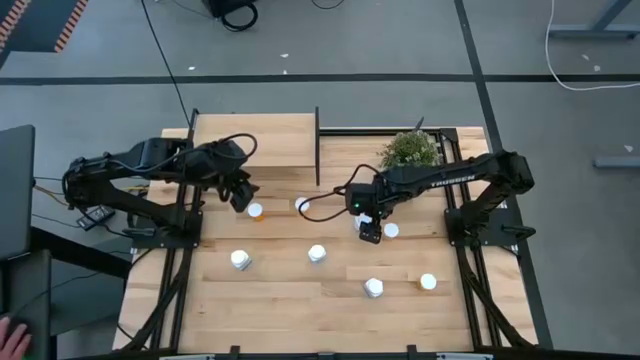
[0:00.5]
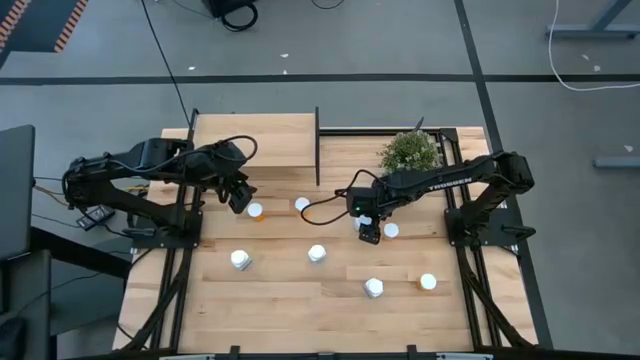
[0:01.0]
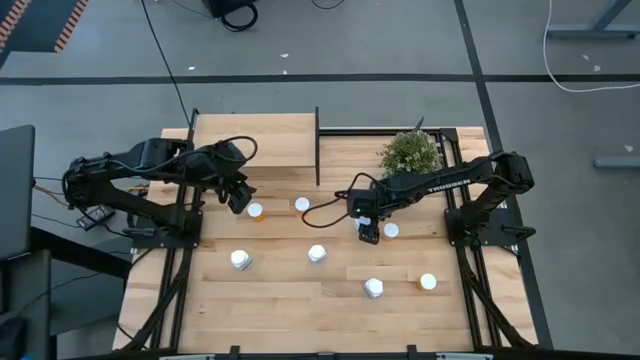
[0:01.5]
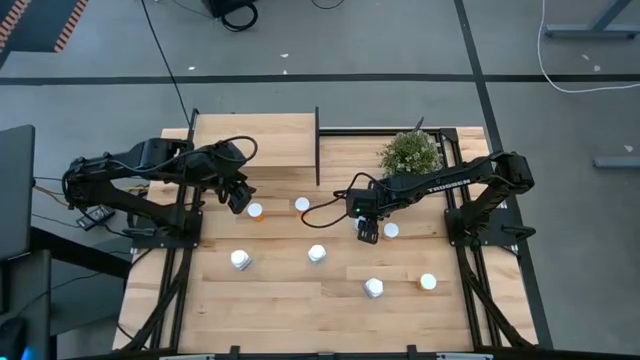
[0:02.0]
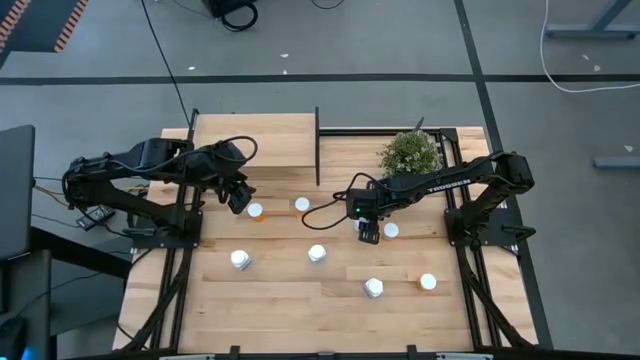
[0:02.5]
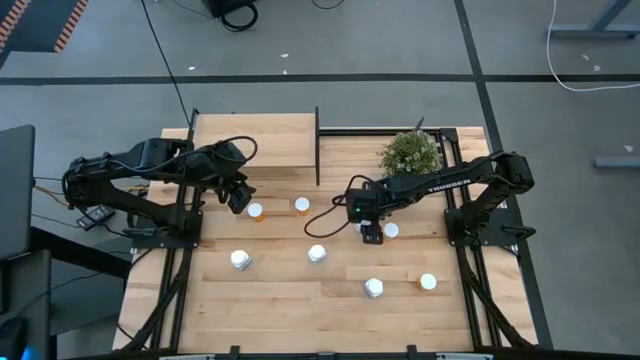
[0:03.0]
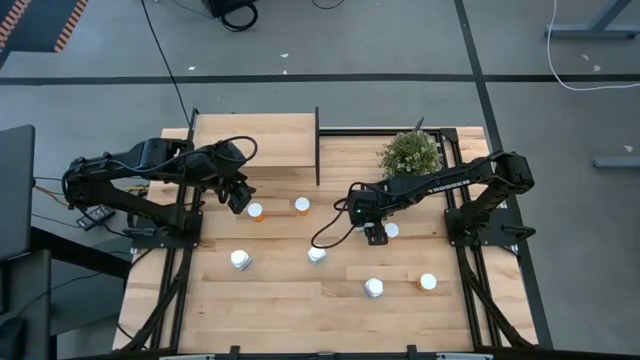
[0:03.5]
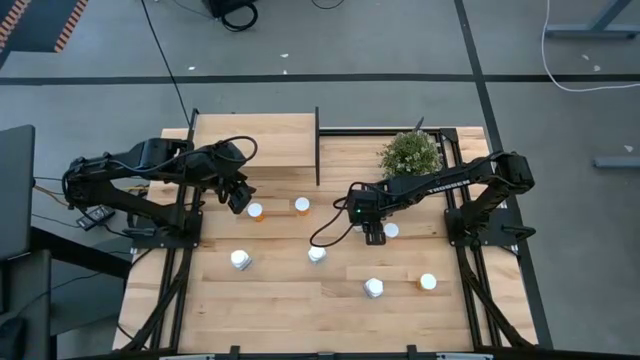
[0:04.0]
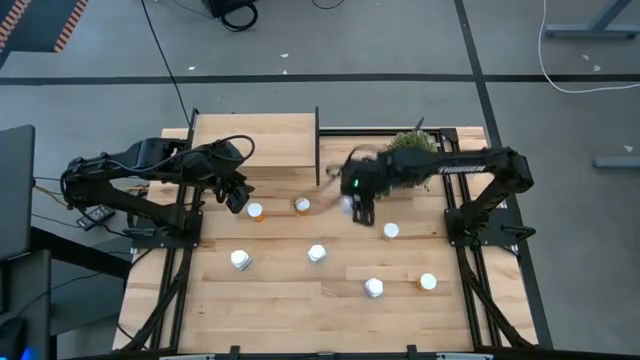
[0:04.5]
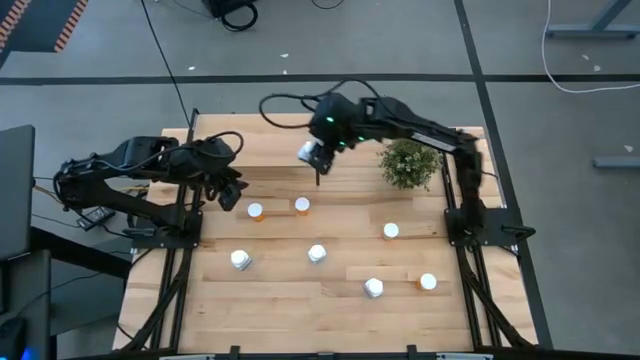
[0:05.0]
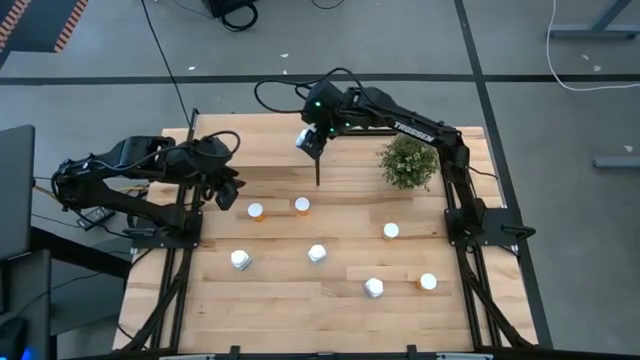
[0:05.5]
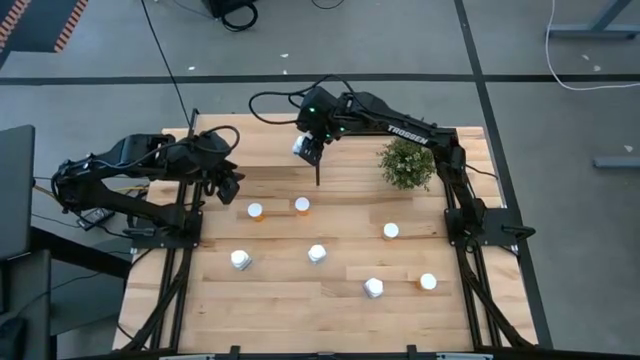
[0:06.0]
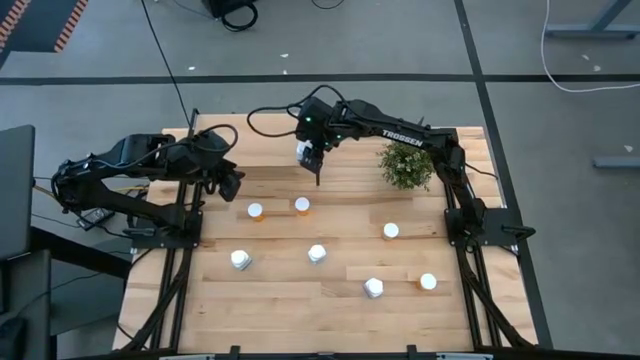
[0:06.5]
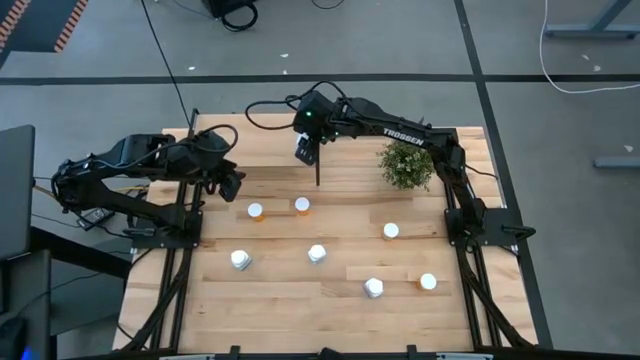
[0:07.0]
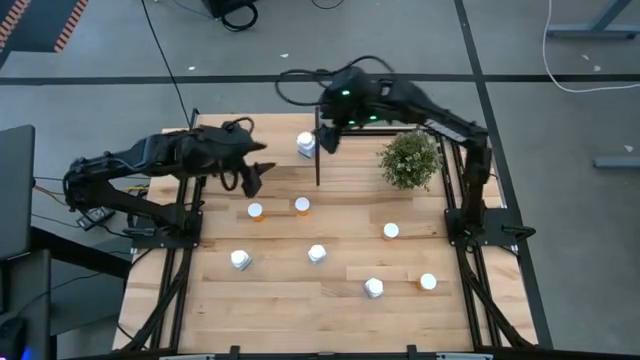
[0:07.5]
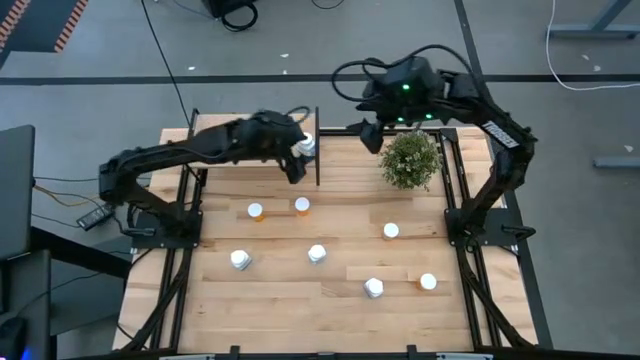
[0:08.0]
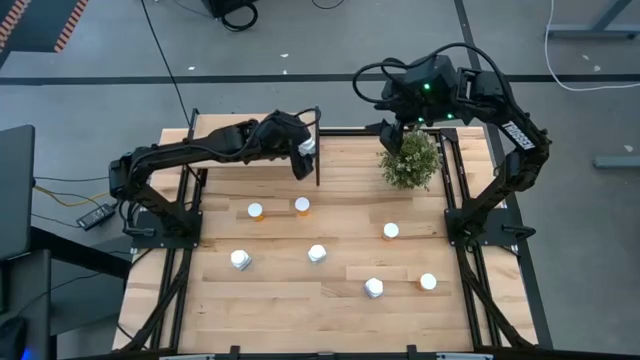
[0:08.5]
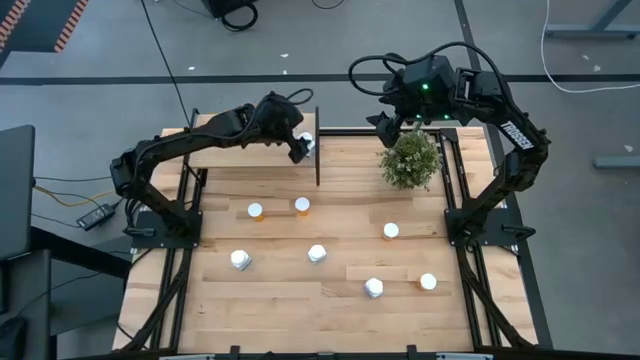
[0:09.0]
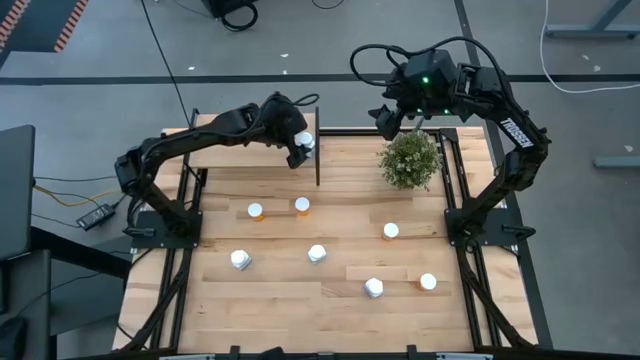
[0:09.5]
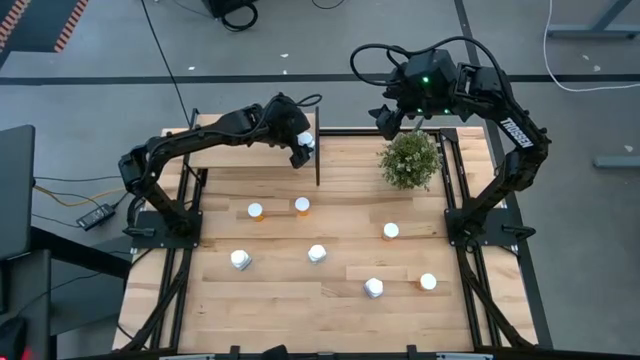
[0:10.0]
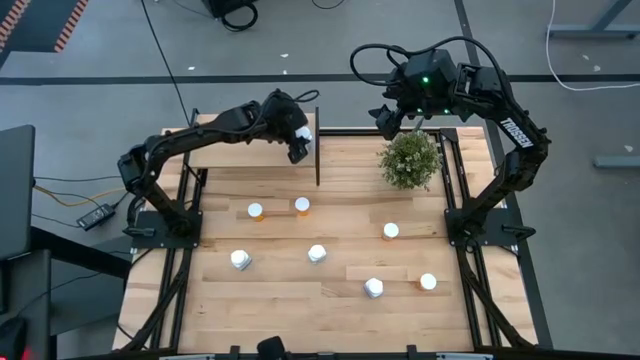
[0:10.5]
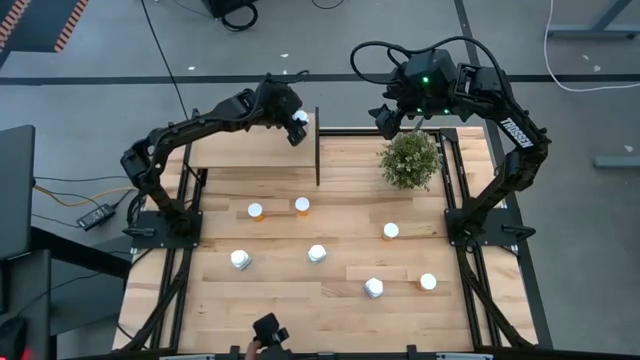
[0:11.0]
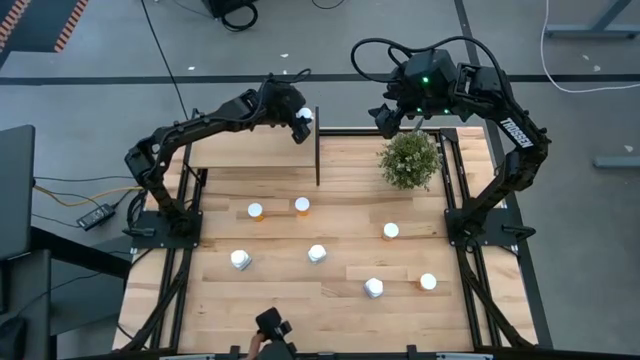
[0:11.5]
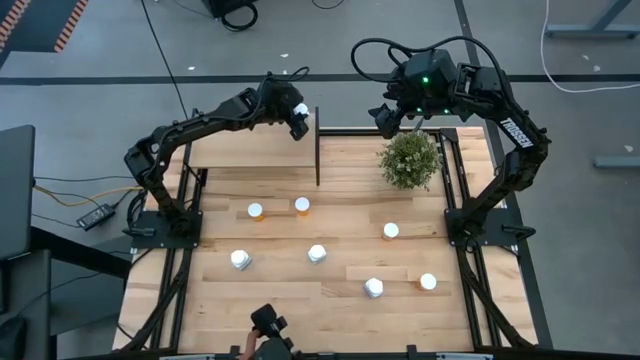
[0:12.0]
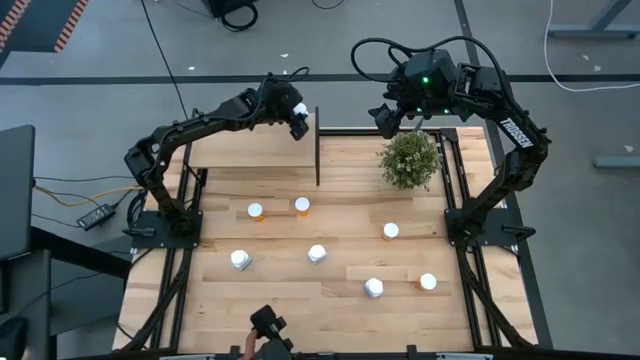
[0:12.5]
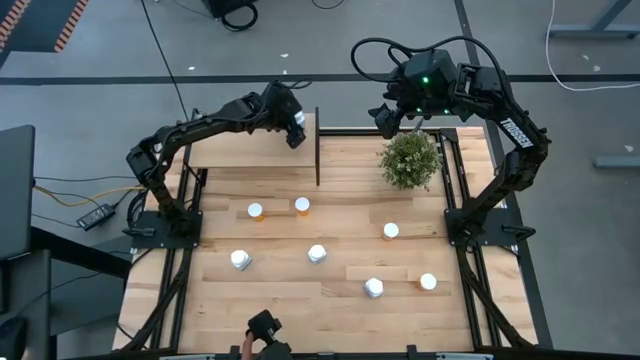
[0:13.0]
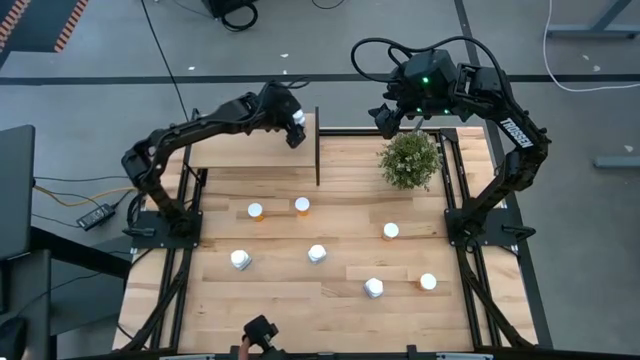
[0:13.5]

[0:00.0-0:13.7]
Task: Pick and place medicine bottles onto shelf by color
Put the supplement bottle on the shelf

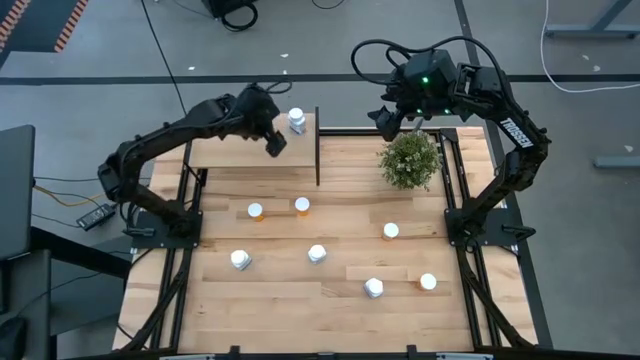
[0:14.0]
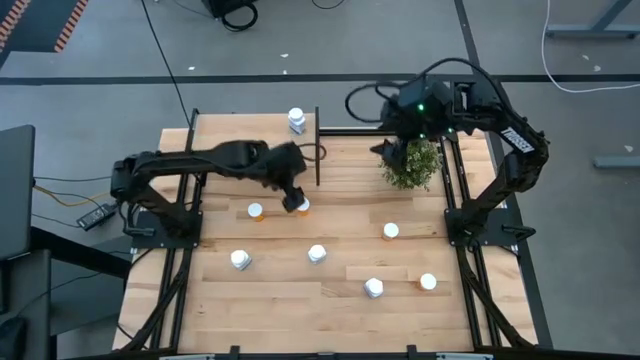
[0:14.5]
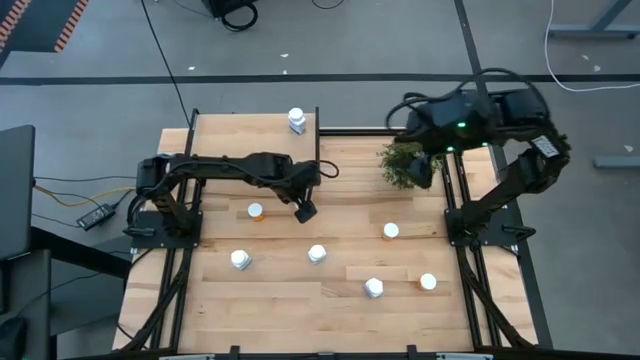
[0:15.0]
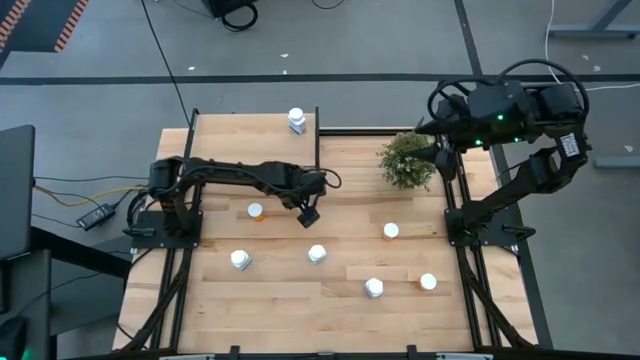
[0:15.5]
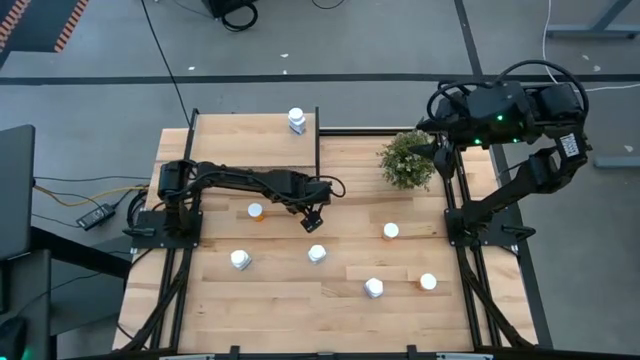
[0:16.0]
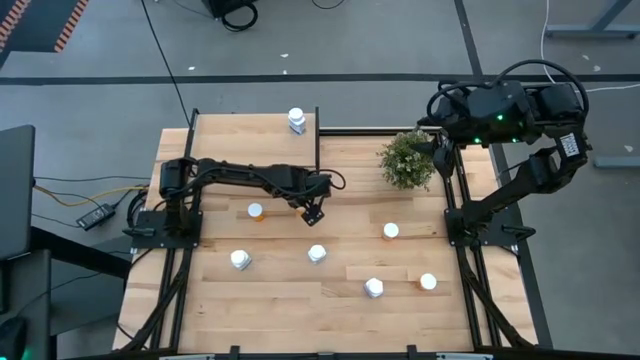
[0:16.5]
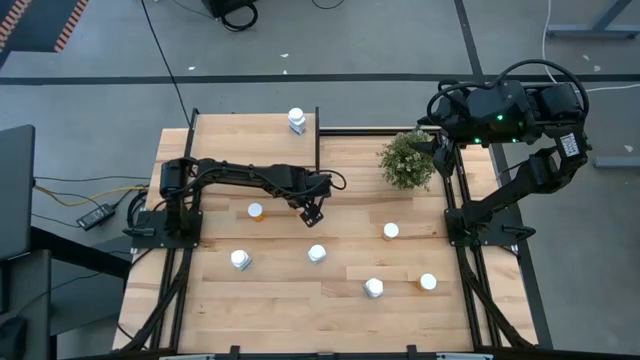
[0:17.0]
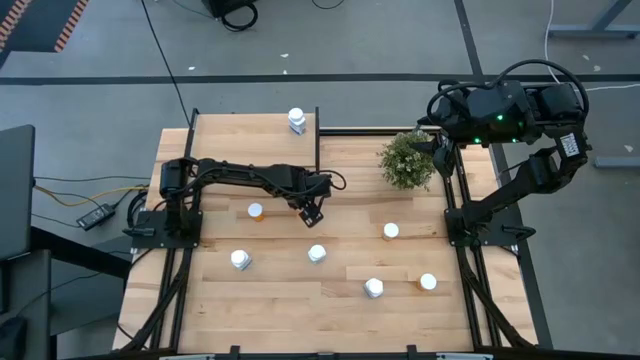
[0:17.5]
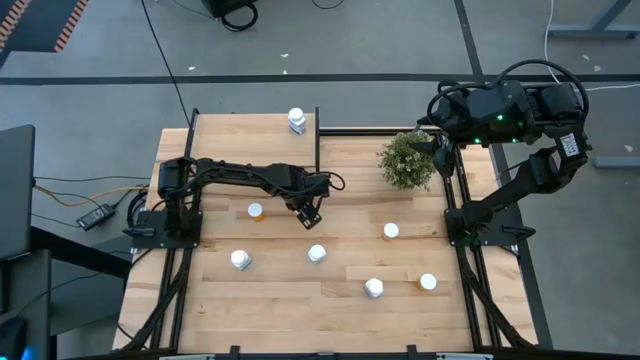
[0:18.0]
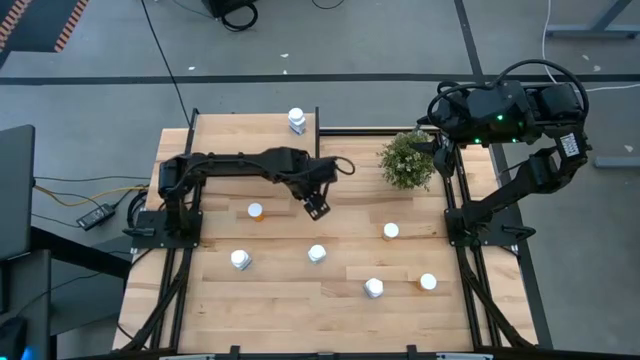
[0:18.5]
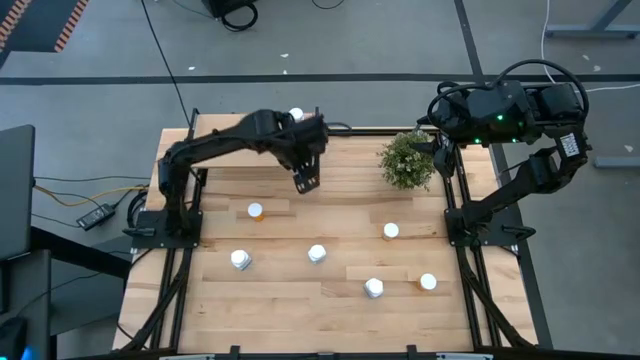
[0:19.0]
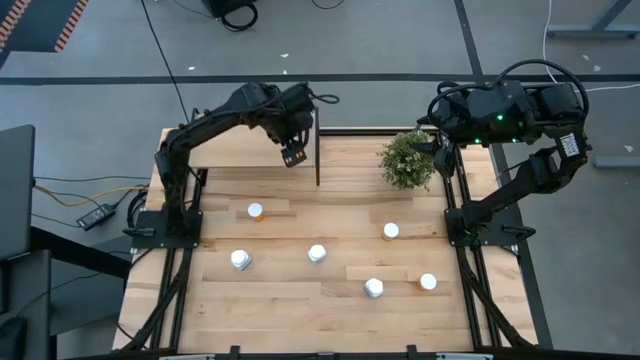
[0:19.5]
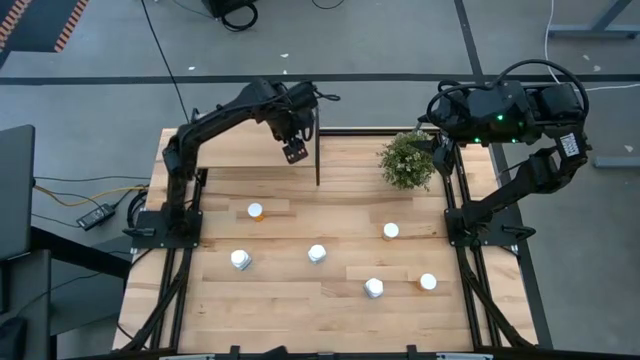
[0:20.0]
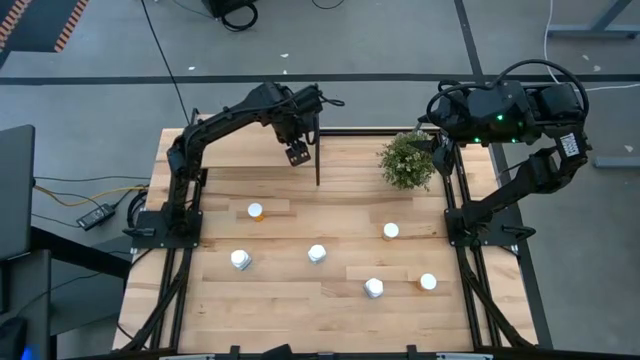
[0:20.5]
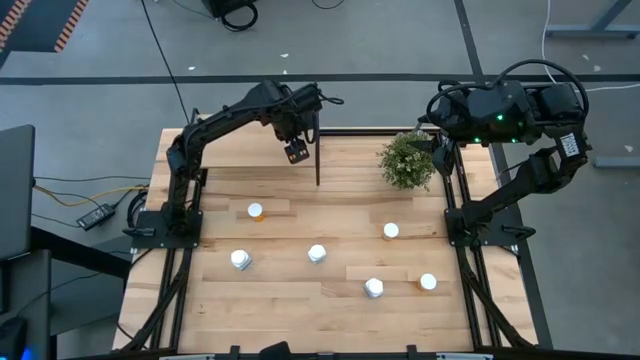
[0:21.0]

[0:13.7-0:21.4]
Put the orange pill bottle on the shelf

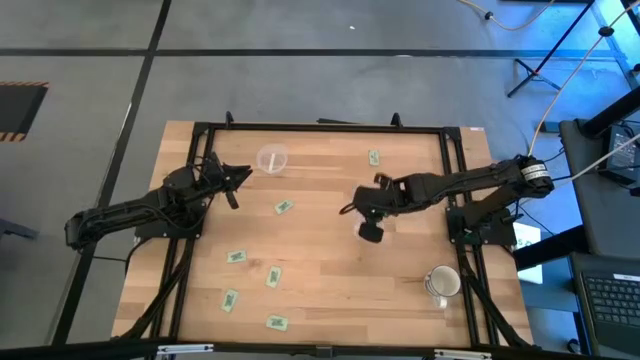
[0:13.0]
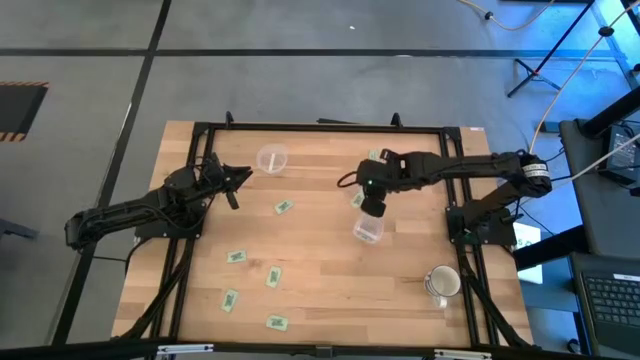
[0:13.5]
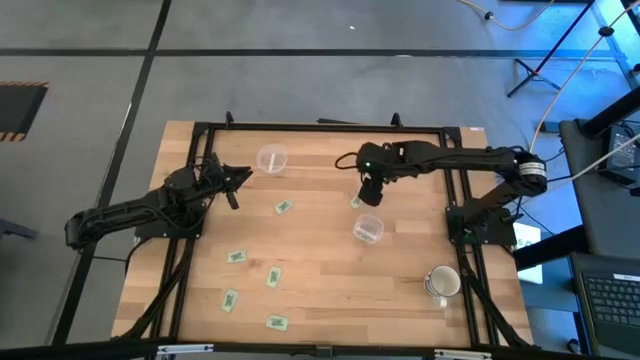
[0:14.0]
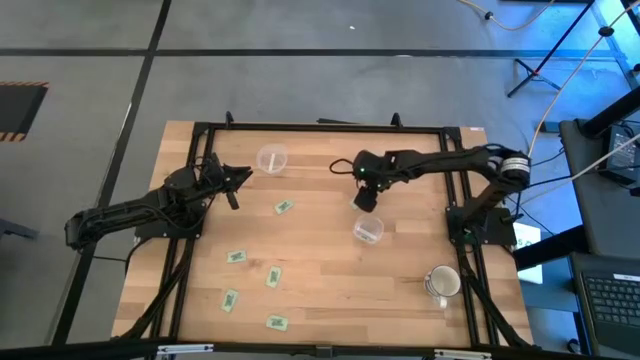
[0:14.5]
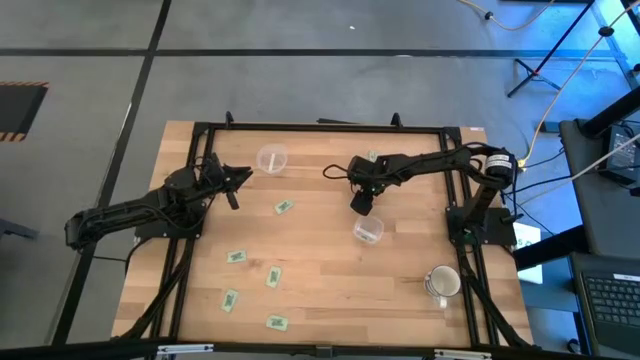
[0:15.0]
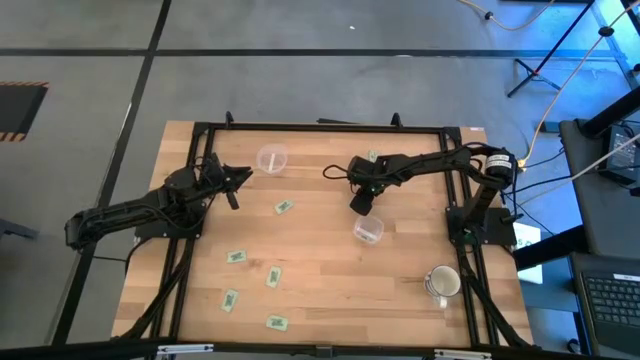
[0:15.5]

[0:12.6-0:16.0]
Task: Pick and place Stevia / Truvia into bins
Put the stevia packet into the bottom transparent container
